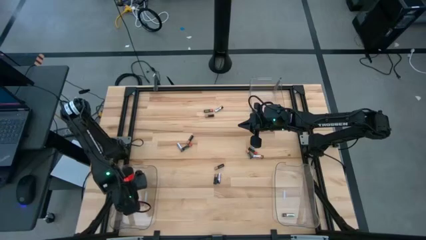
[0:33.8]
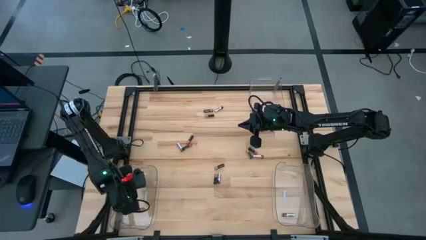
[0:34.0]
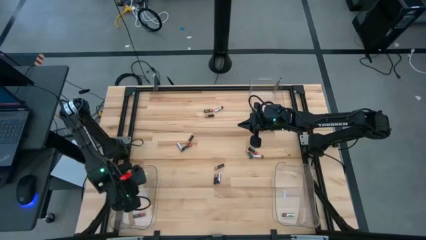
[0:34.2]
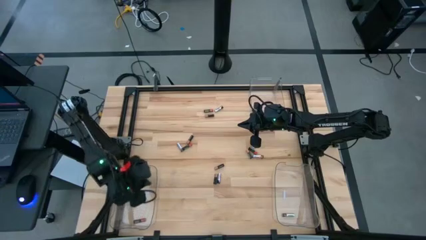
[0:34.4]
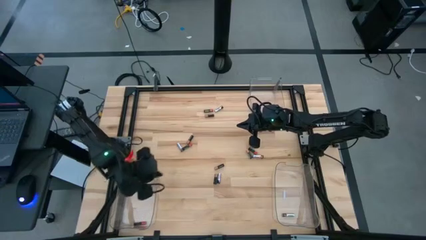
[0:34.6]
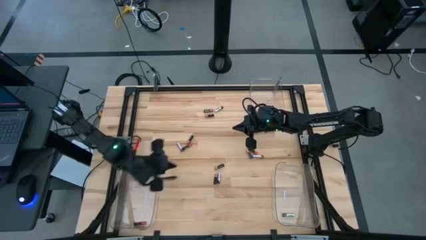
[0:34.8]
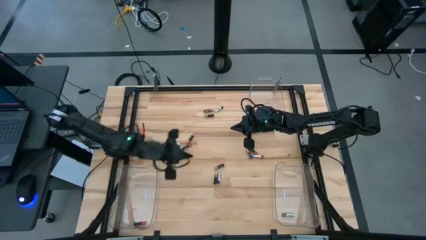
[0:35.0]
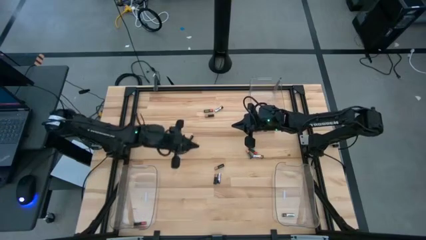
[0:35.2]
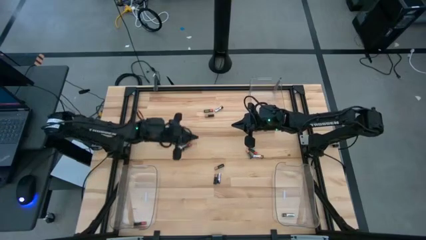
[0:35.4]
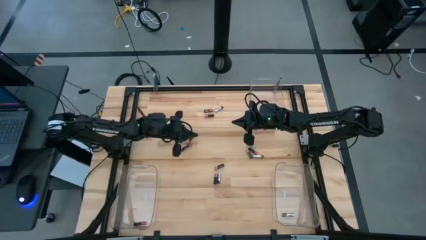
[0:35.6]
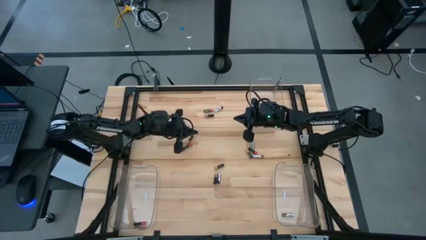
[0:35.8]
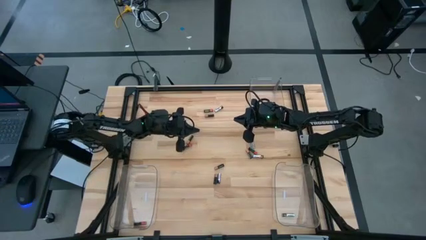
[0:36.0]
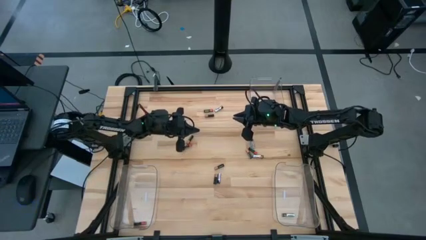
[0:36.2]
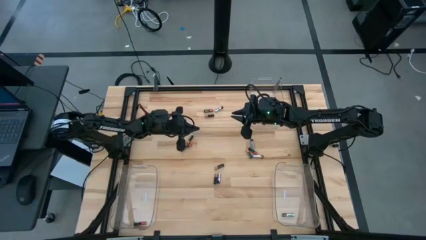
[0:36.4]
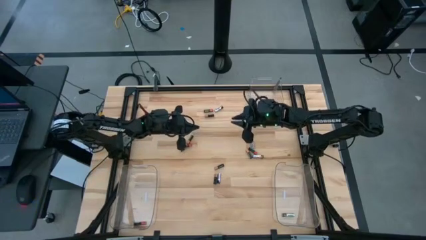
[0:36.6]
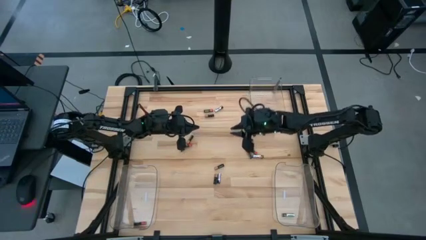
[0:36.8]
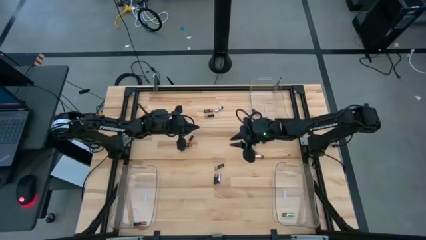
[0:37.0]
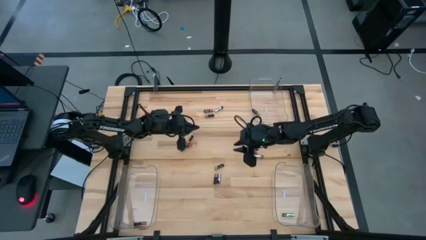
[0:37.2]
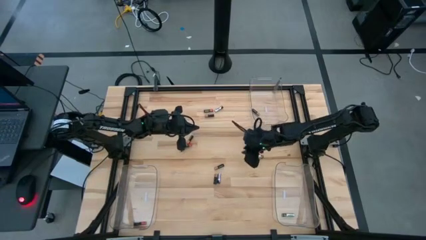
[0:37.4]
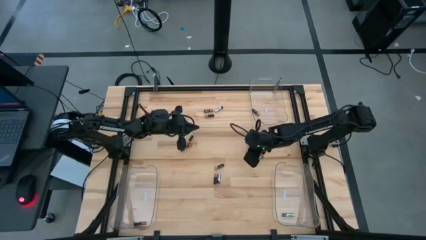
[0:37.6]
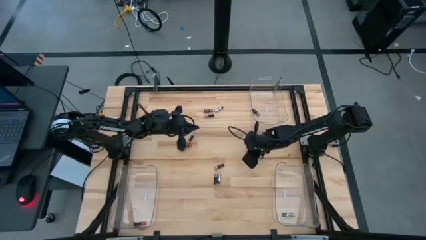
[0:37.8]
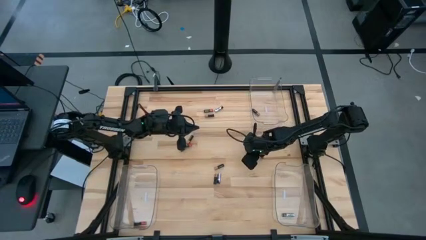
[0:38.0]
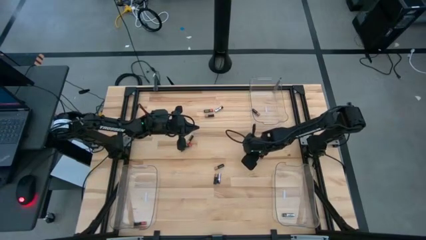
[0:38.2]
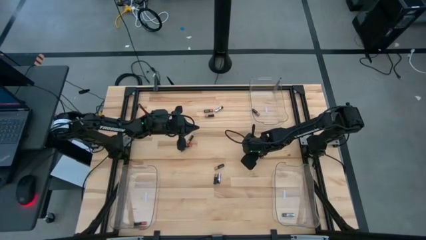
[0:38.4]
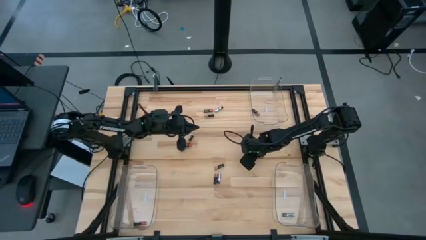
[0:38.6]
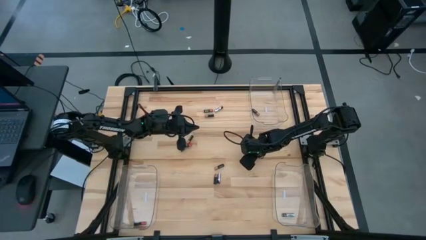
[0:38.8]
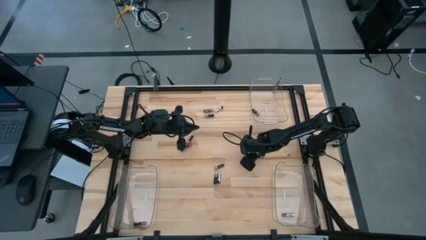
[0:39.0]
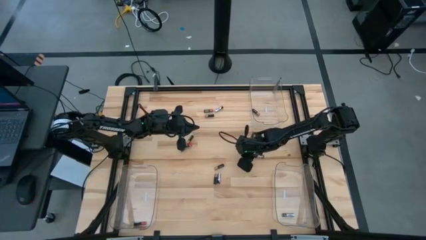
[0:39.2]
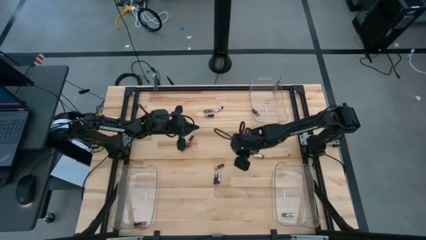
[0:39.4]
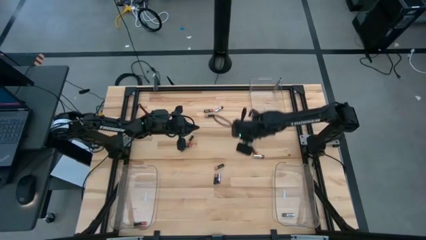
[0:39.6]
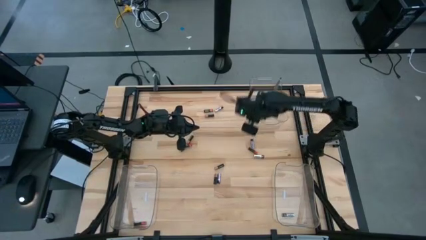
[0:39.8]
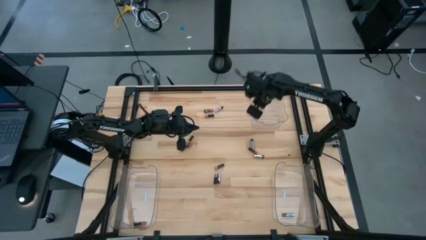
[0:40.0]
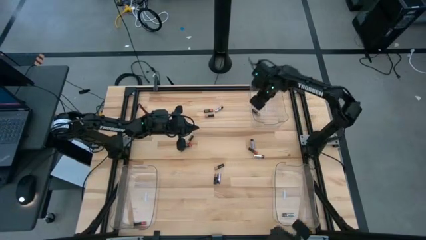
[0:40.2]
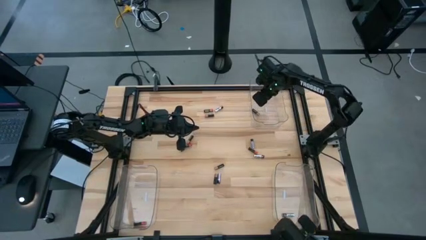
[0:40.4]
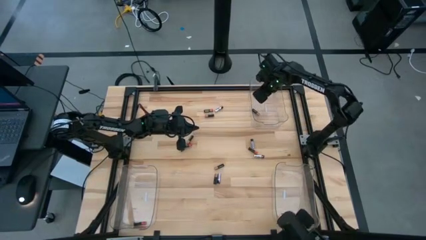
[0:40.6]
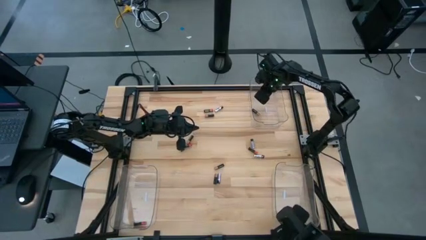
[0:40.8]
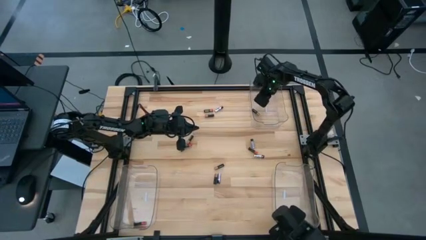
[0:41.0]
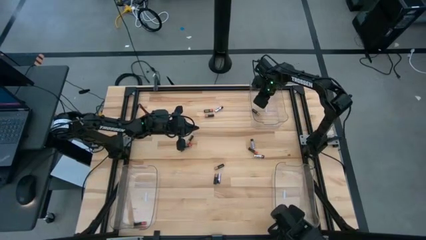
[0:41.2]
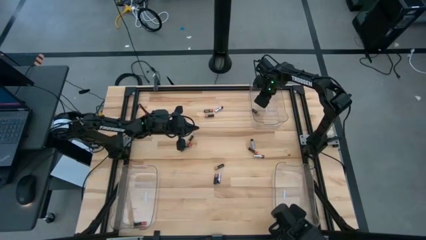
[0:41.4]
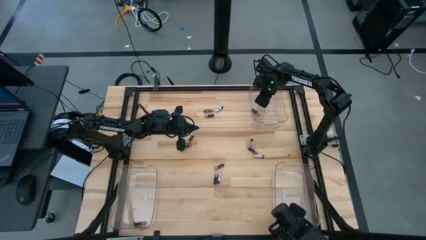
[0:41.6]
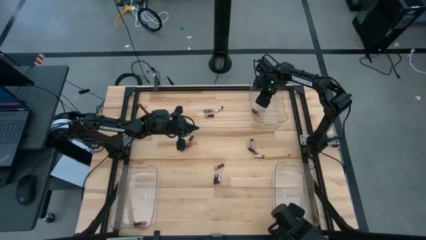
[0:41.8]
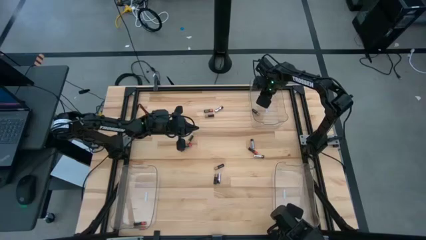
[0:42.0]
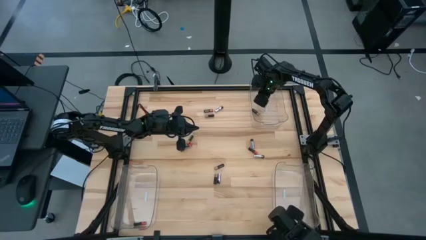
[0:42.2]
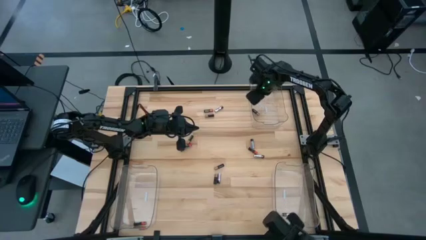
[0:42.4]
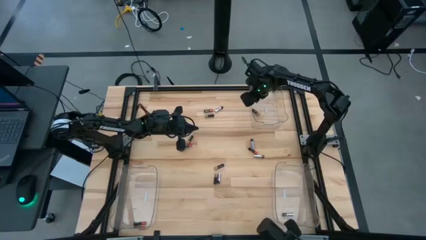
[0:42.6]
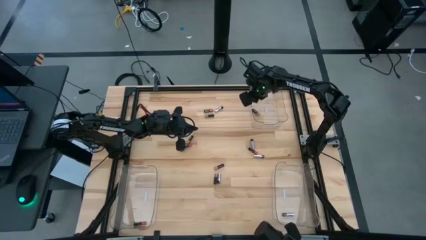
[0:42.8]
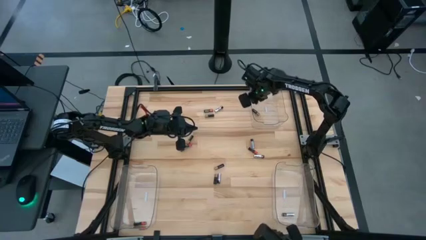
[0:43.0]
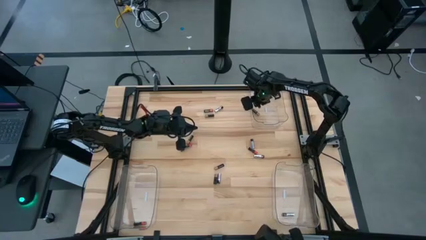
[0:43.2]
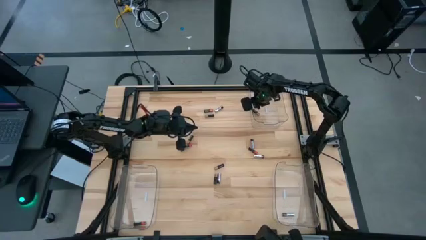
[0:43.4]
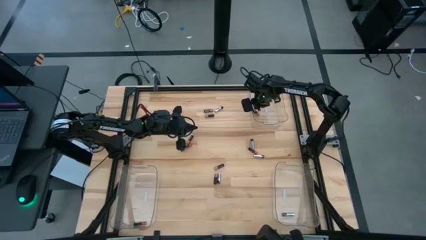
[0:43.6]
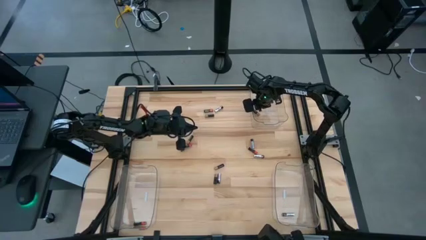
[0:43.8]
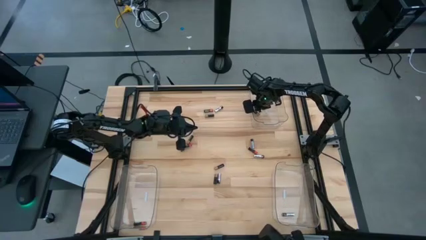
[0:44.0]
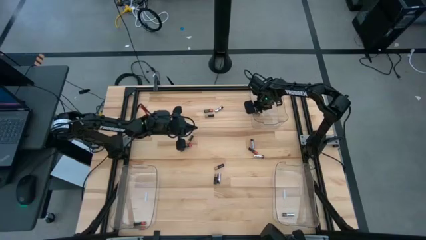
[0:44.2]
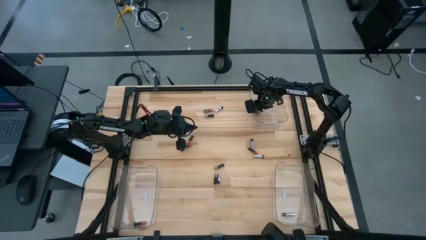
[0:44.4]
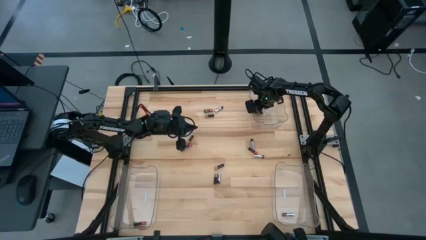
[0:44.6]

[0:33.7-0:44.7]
Task: Sort batteries
Put the brown battery into the top transparent bin

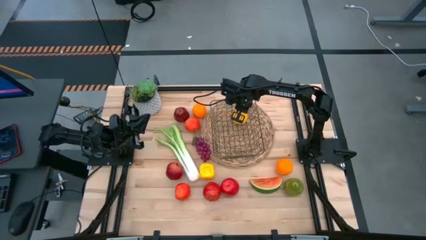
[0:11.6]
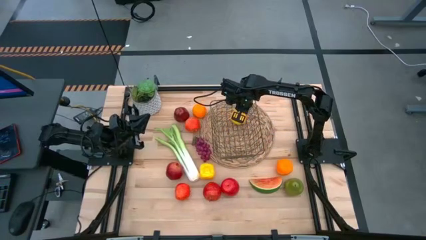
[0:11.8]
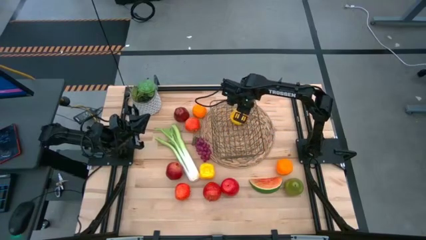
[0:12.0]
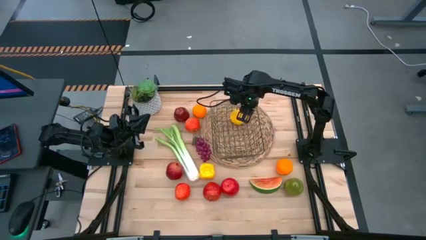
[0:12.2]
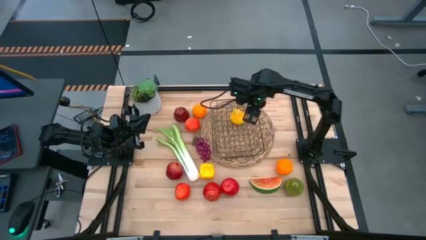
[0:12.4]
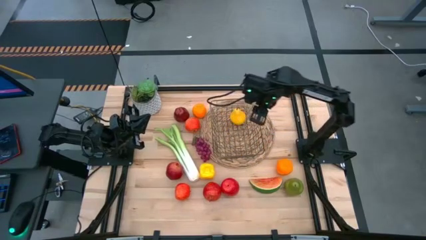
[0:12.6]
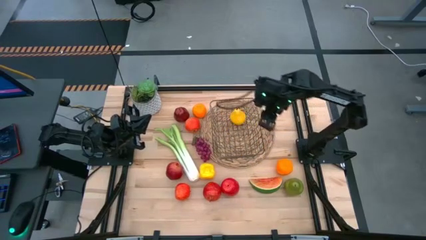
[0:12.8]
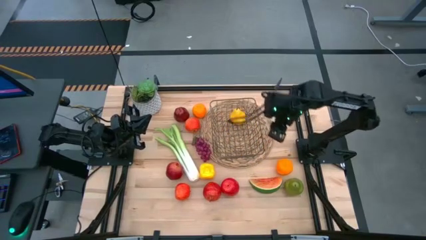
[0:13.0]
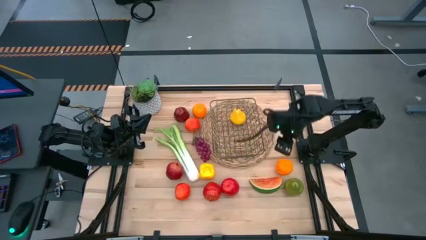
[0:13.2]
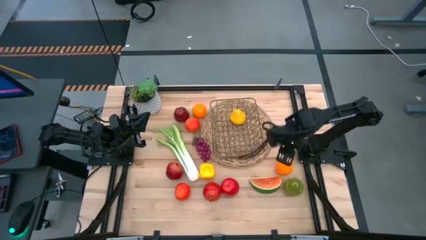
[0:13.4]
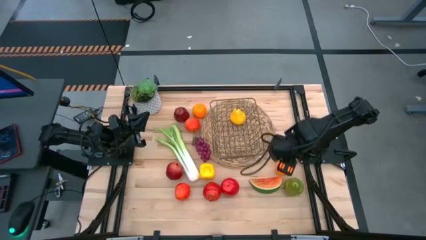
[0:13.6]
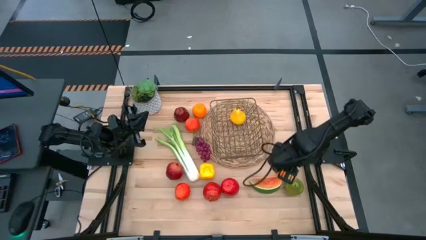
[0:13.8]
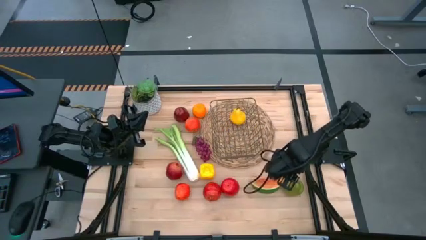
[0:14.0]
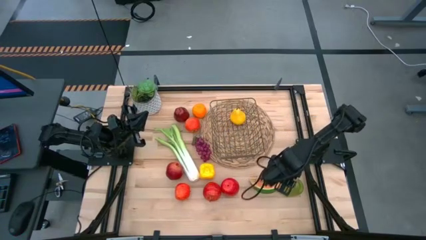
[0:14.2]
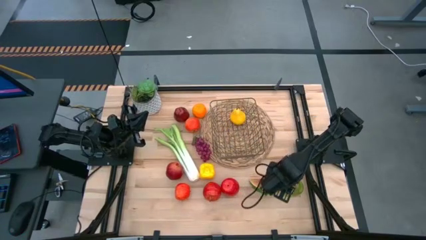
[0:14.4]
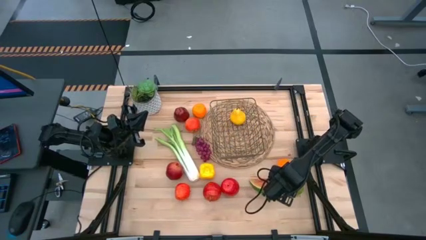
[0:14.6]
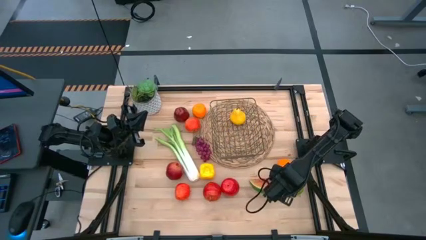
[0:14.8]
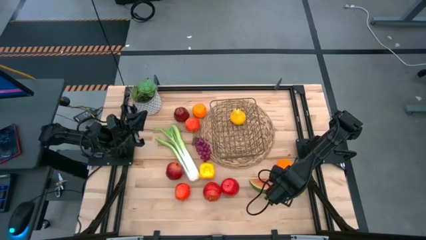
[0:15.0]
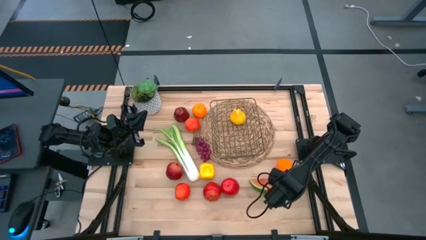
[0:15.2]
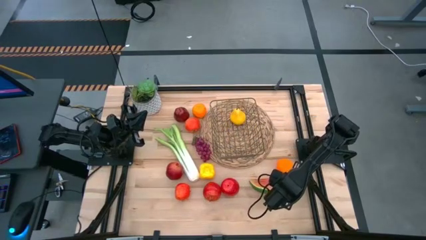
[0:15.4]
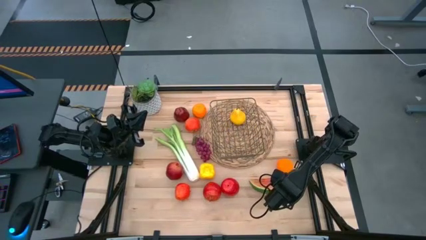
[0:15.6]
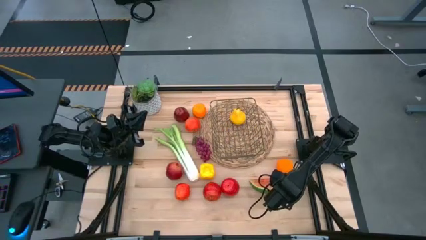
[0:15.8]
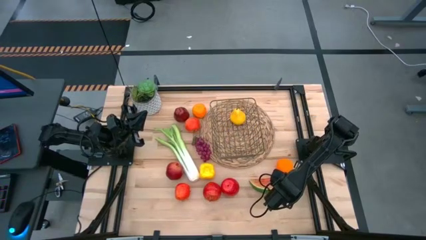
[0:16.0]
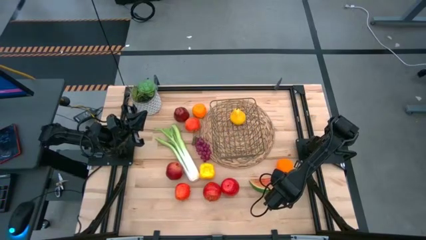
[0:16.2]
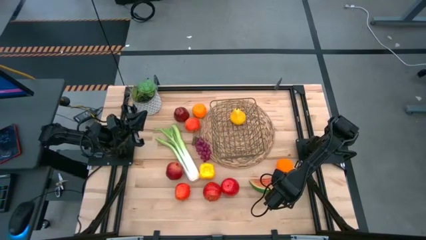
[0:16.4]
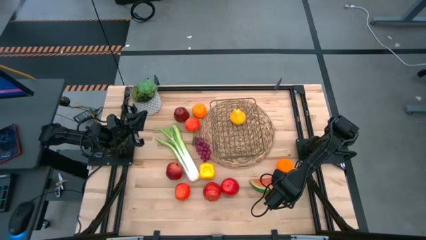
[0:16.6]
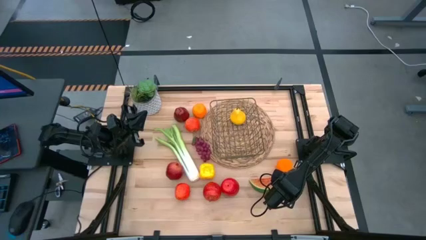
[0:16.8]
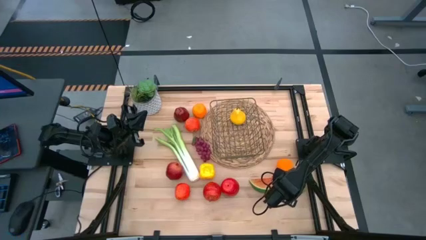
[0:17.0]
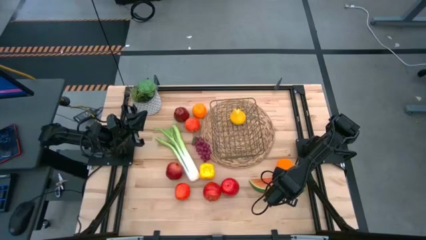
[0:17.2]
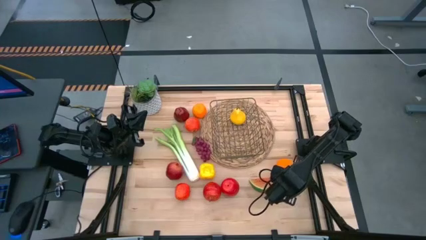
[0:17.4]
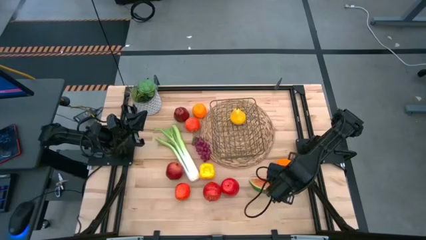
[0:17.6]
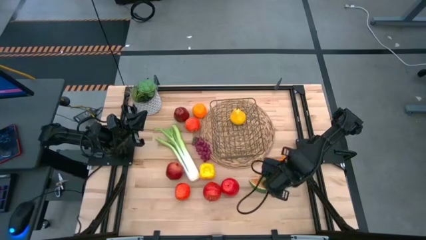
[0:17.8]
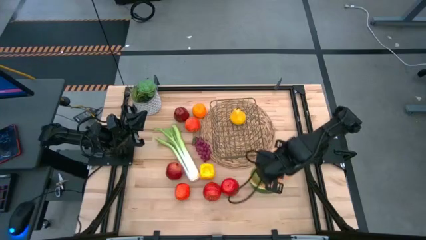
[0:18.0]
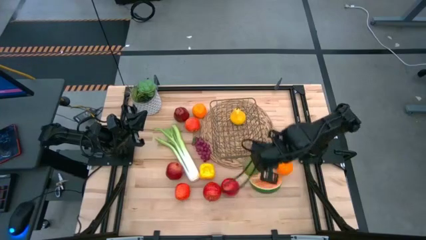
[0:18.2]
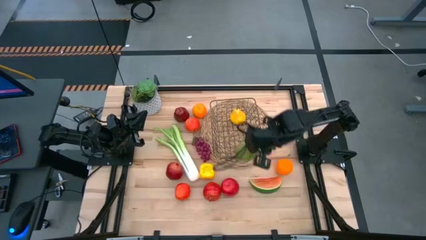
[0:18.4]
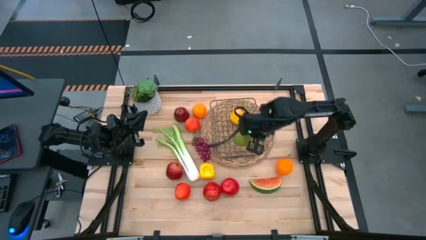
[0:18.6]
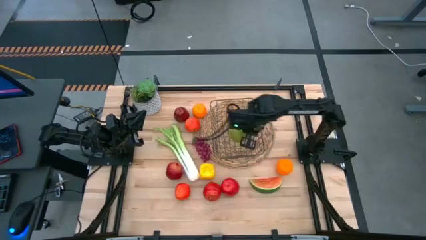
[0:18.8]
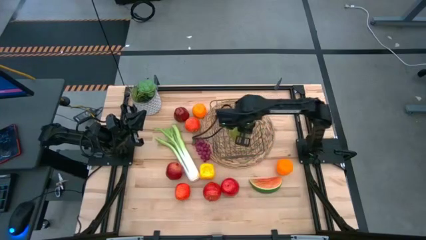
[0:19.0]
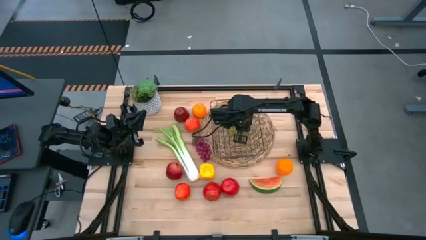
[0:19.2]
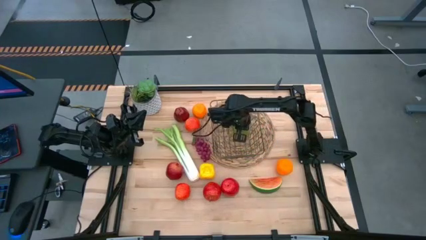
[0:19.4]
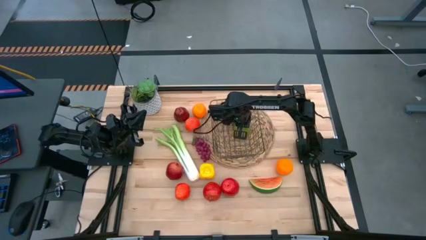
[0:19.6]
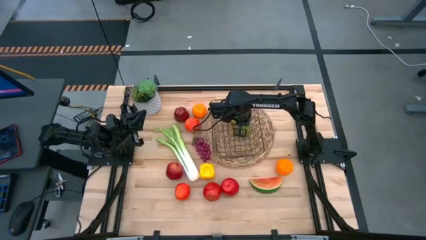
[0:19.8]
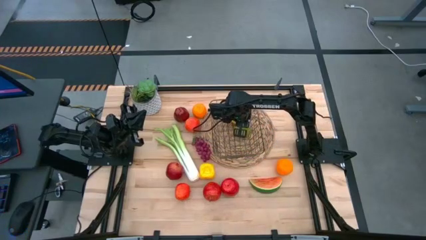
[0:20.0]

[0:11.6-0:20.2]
Task: Build produce basket
Put the green pear into the wire basket
